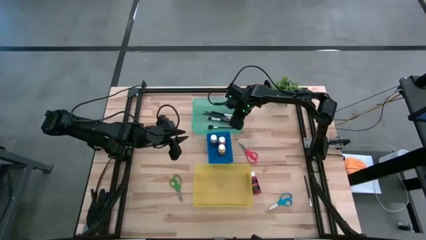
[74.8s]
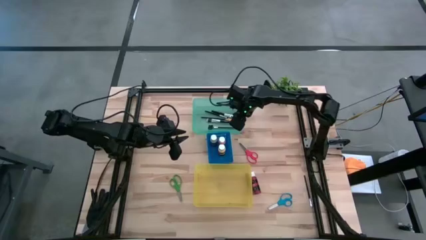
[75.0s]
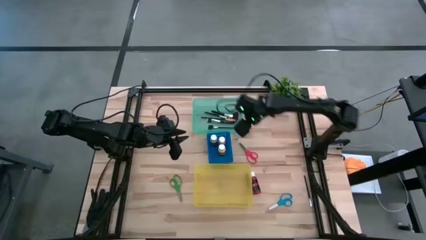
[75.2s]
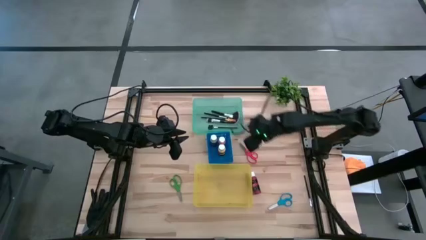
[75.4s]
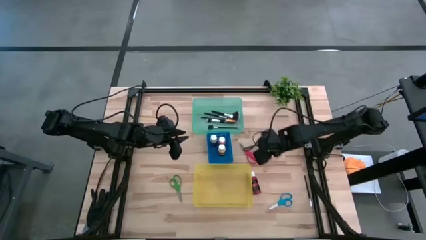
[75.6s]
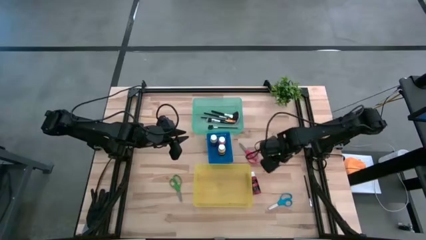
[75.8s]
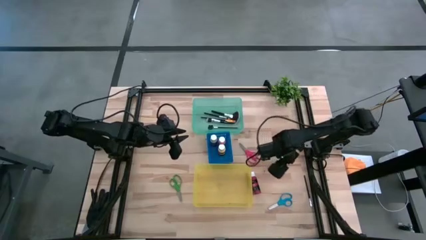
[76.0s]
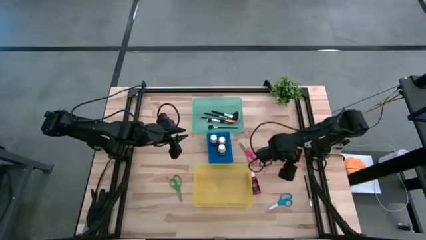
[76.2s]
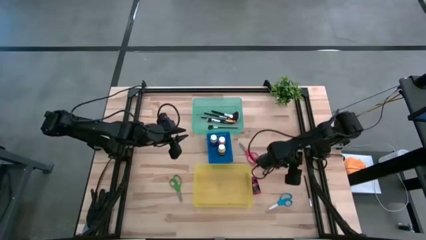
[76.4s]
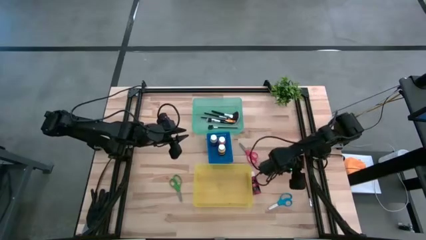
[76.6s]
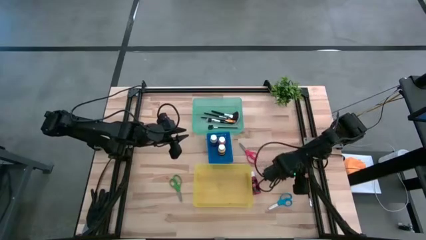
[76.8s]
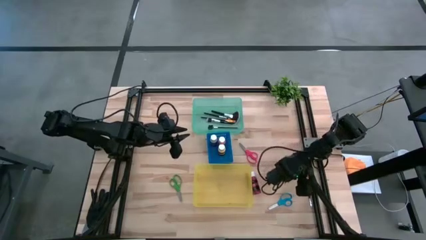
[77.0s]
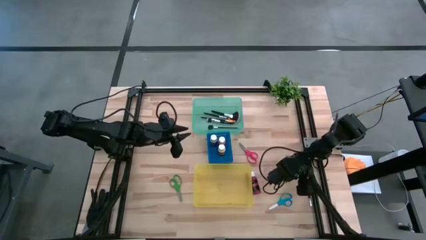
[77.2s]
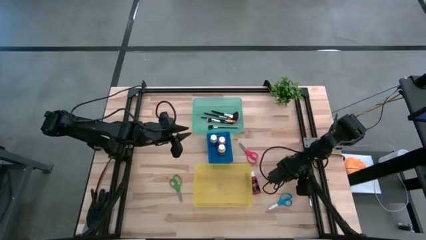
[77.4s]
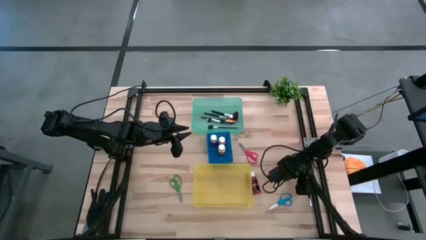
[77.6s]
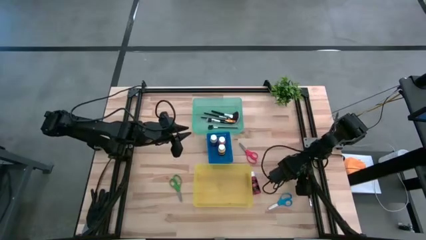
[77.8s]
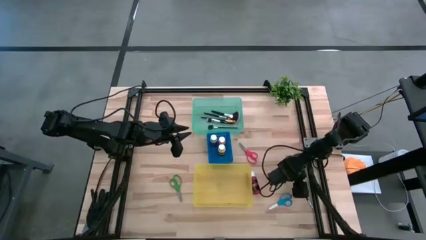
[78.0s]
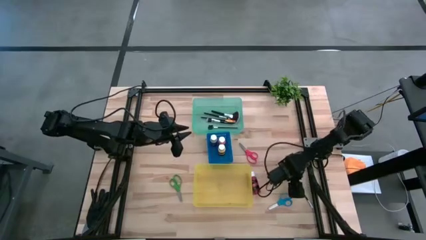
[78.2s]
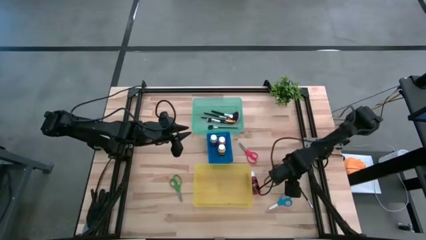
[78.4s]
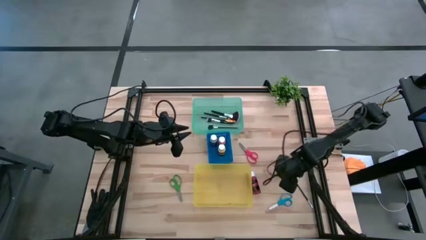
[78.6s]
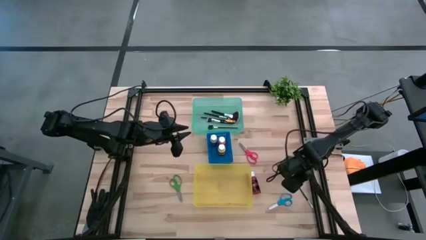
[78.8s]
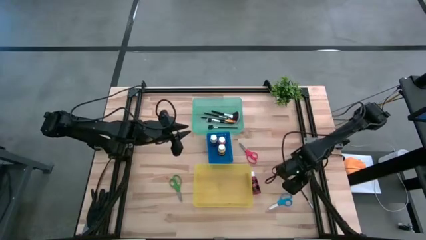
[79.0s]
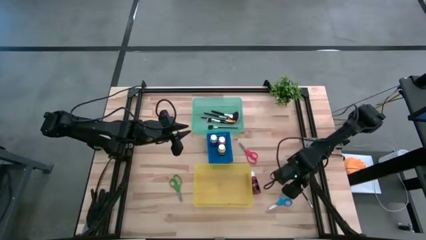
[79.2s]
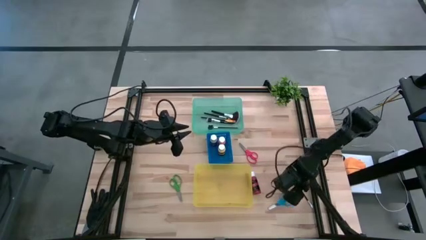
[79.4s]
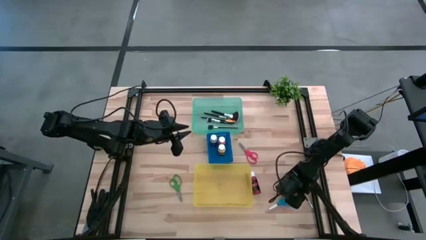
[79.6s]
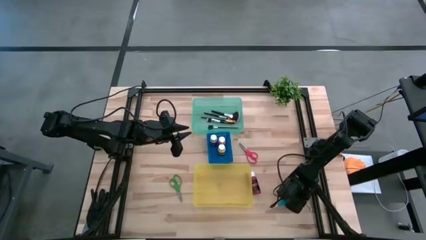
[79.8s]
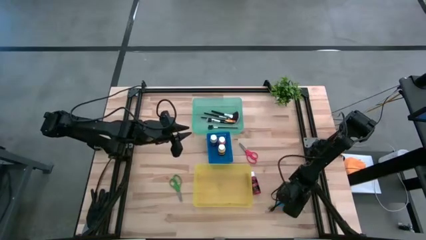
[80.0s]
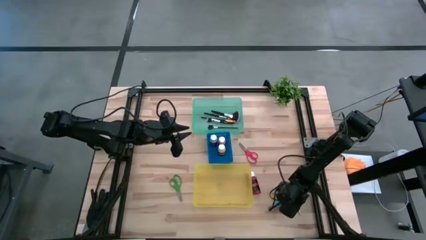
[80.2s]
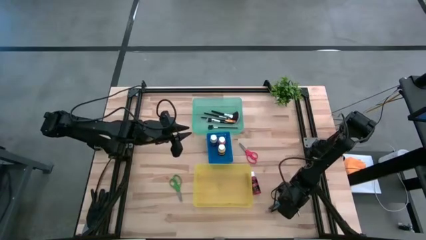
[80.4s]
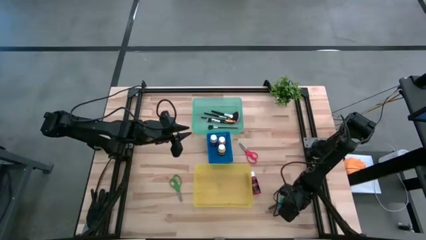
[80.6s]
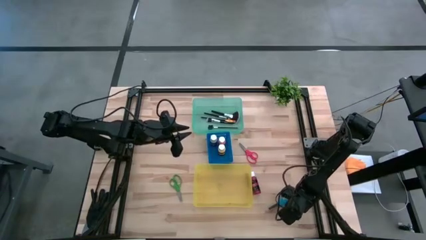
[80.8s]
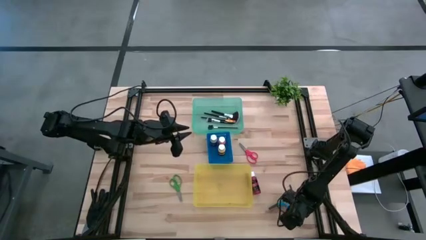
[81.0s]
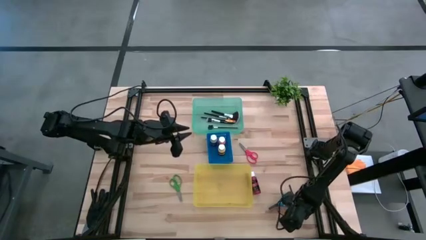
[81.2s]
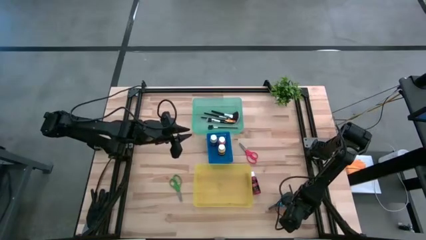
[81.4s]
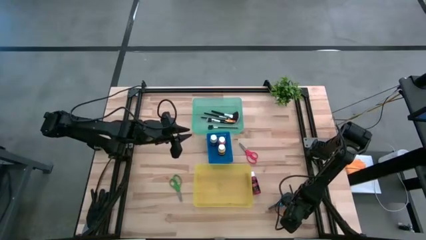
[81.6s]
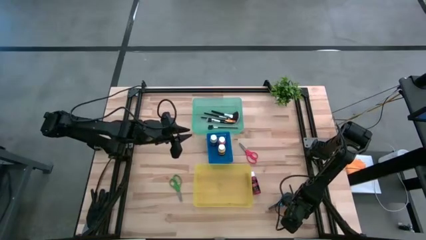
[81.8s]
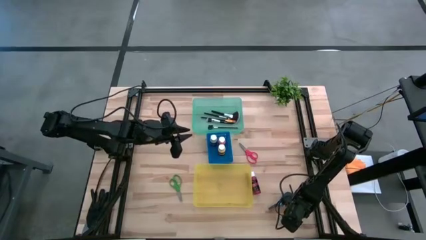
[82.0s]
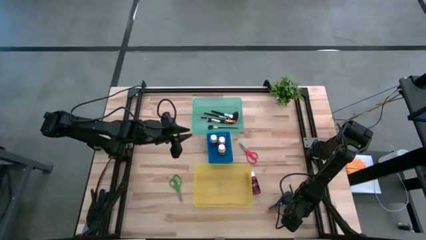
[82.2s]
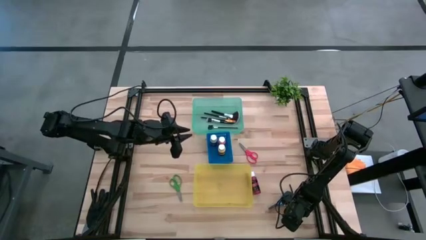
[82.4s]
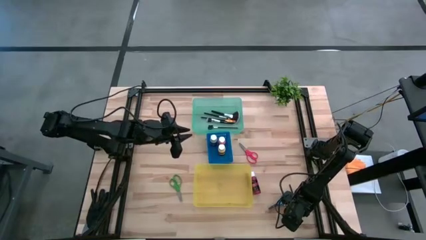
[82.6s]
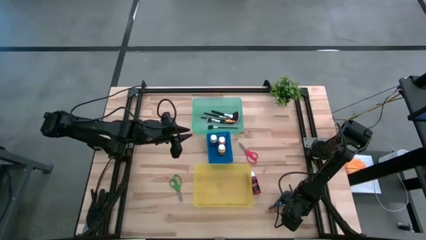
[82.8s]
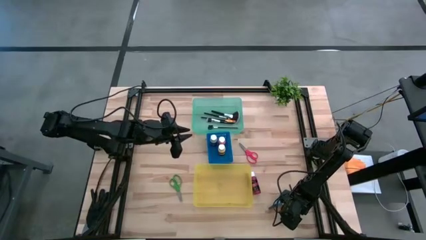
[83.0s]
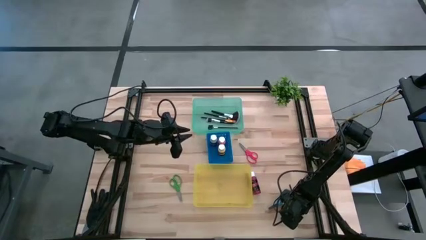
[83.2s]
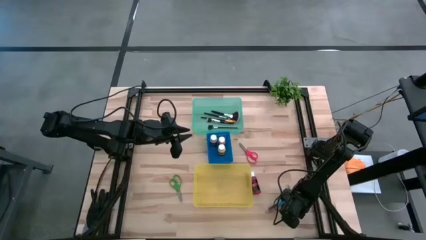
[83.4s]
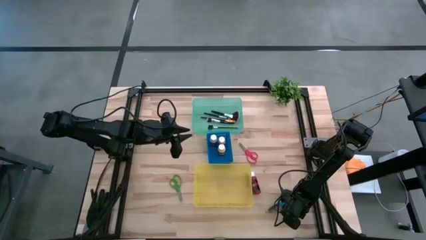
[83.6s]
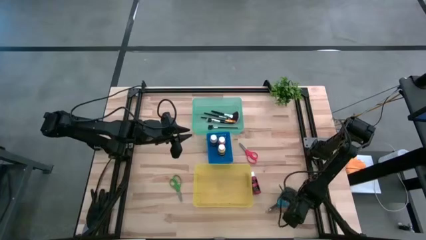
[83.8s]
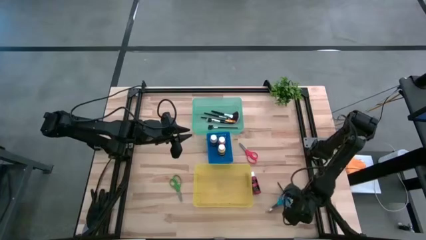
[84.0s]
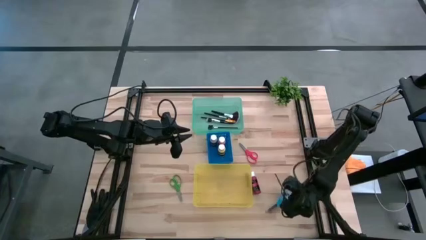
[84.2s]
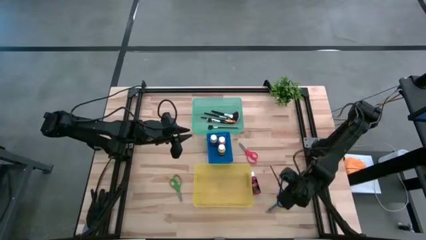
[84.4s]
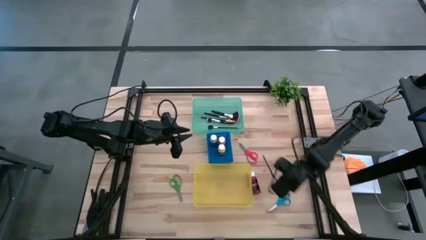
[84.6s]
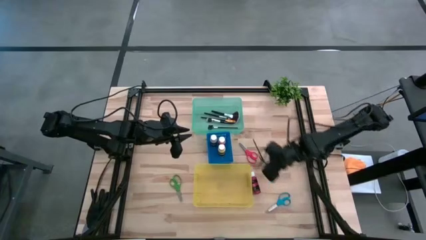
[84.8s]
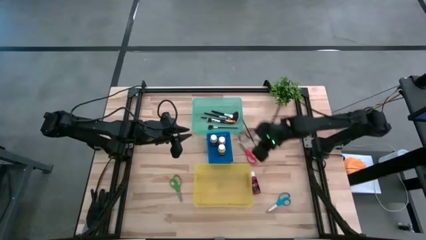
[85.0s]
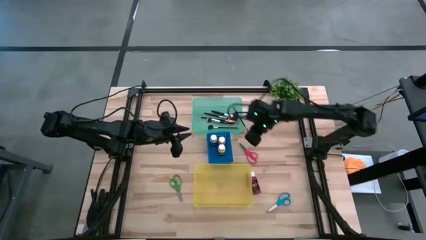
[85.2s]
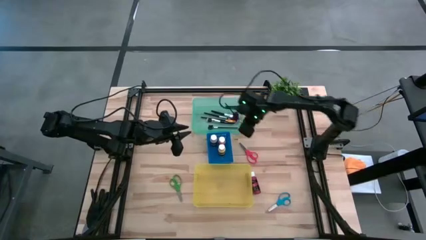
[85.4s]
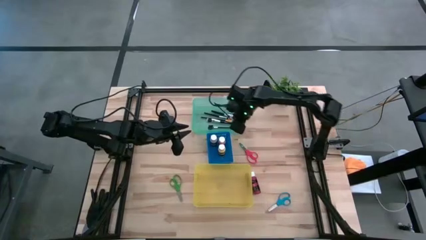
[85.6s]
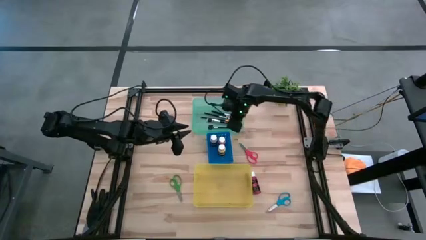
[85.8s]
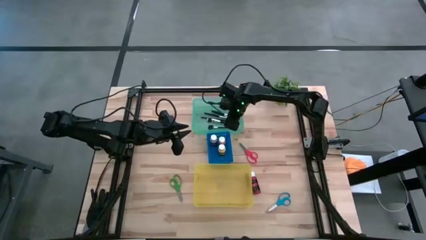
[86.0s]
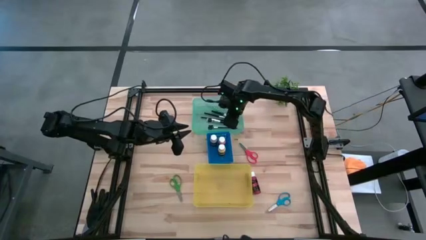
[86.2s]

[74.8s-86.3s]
Task: Pick & Place Paint Supplies
Put the black eyeshadow brush into the green bin
